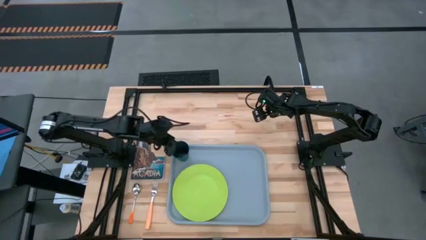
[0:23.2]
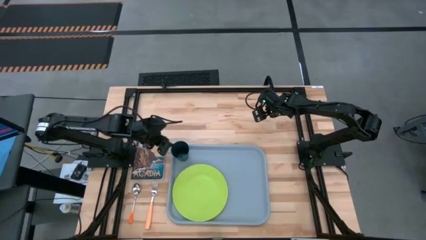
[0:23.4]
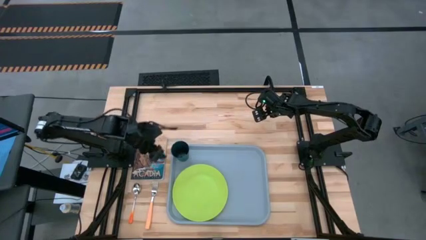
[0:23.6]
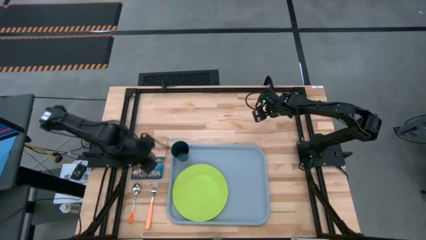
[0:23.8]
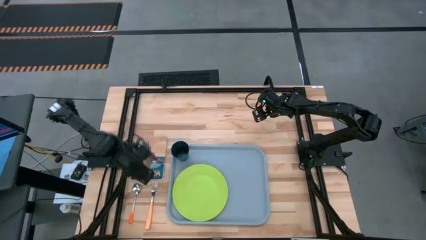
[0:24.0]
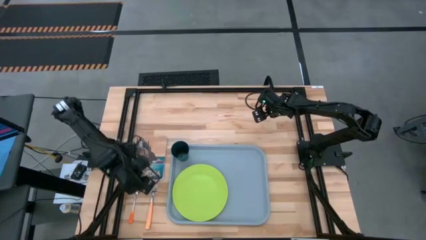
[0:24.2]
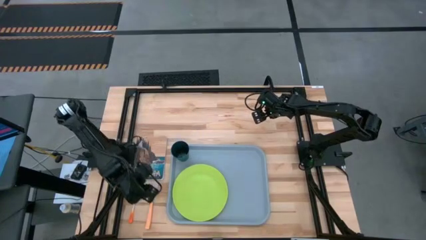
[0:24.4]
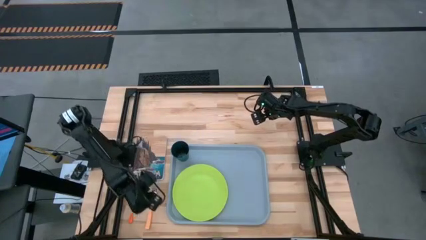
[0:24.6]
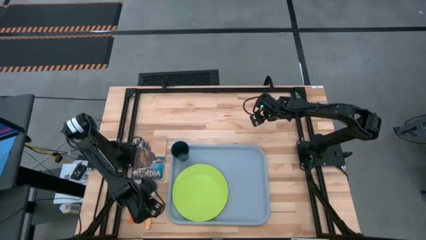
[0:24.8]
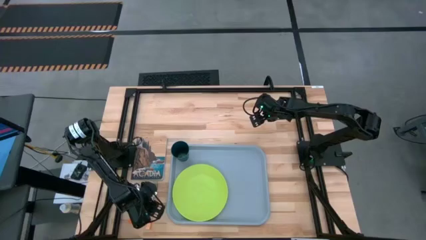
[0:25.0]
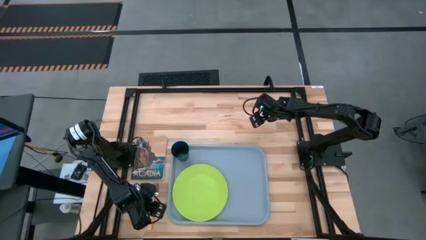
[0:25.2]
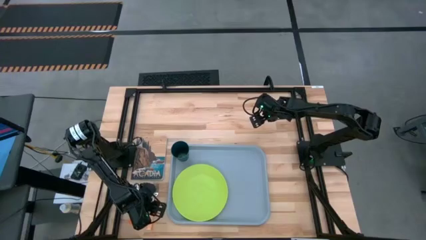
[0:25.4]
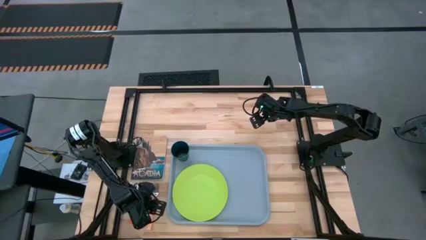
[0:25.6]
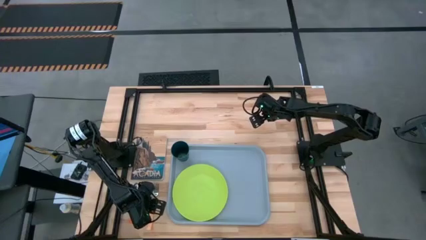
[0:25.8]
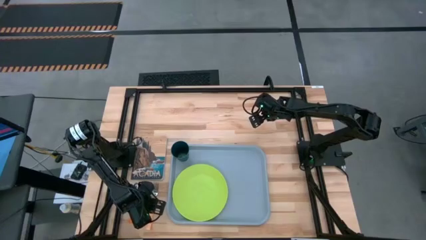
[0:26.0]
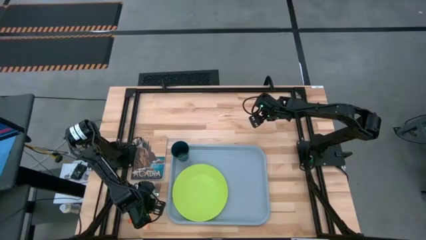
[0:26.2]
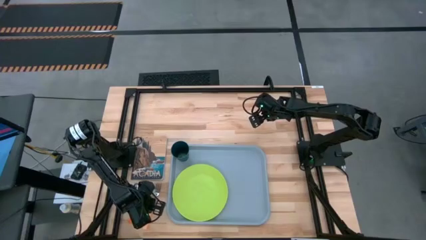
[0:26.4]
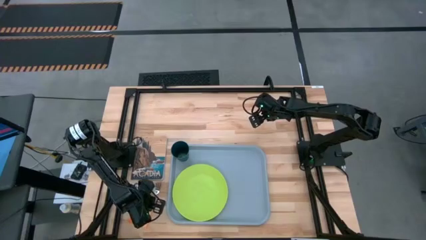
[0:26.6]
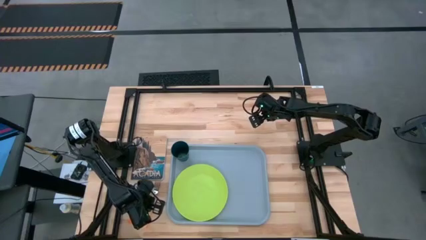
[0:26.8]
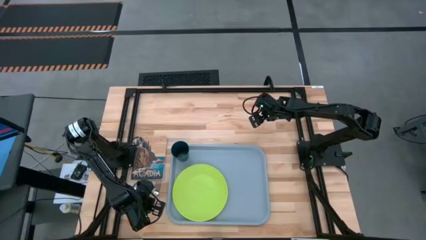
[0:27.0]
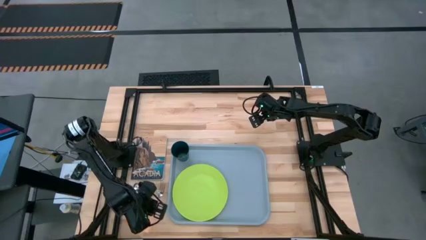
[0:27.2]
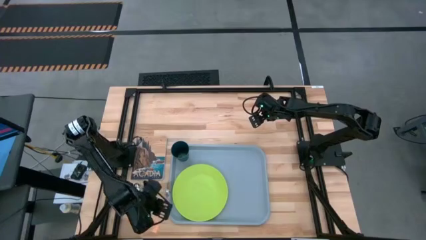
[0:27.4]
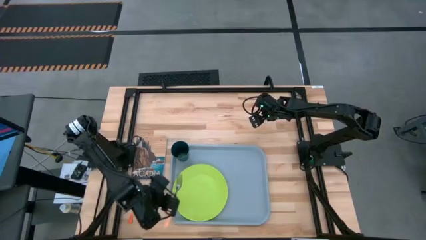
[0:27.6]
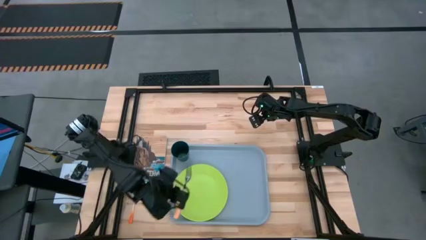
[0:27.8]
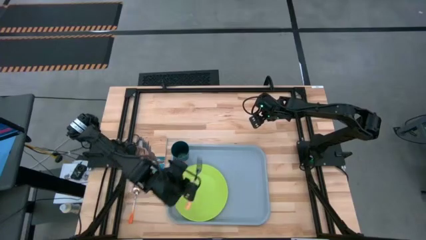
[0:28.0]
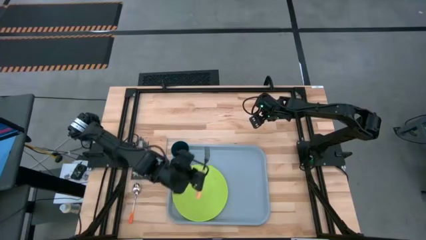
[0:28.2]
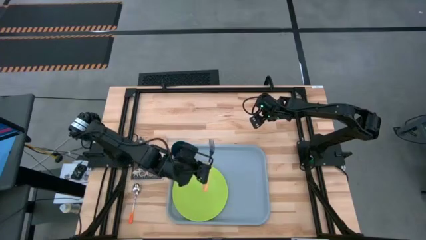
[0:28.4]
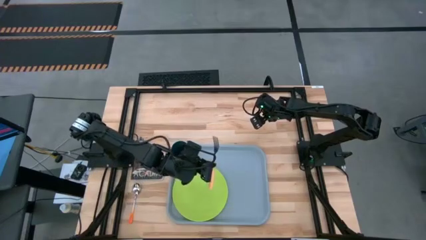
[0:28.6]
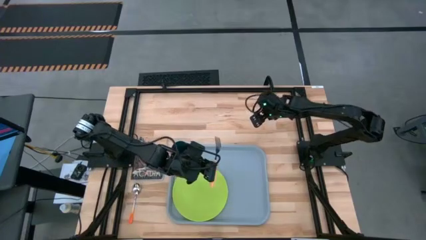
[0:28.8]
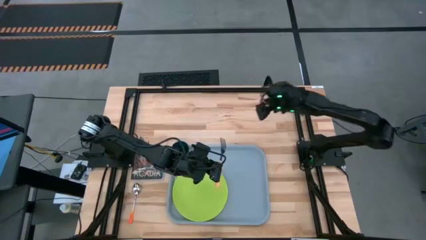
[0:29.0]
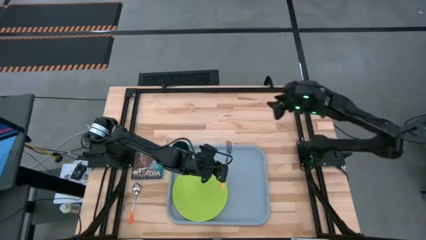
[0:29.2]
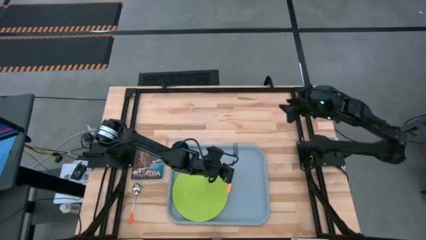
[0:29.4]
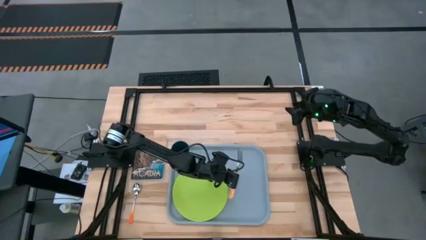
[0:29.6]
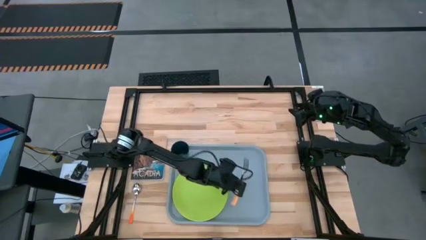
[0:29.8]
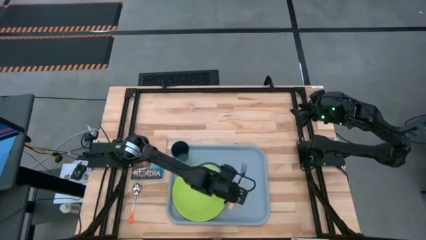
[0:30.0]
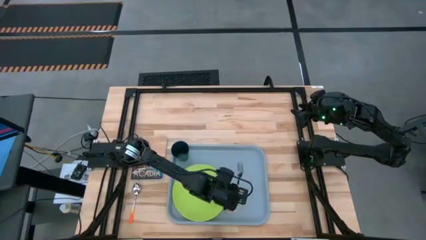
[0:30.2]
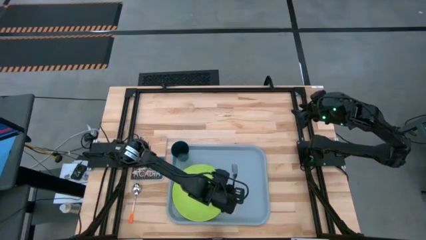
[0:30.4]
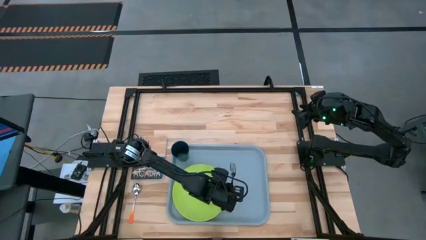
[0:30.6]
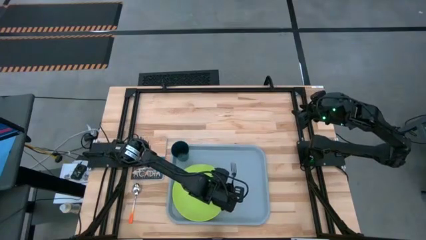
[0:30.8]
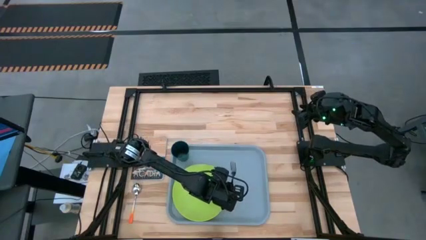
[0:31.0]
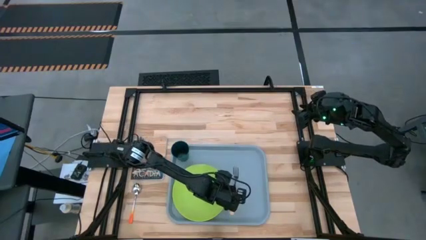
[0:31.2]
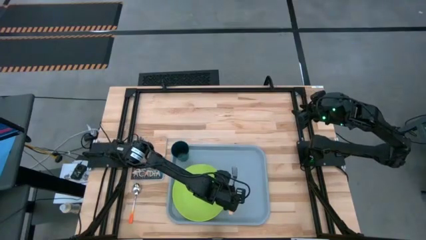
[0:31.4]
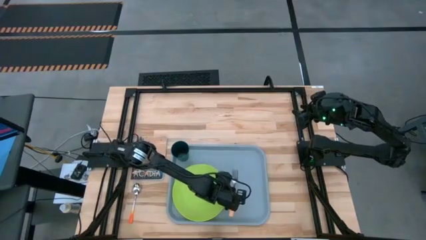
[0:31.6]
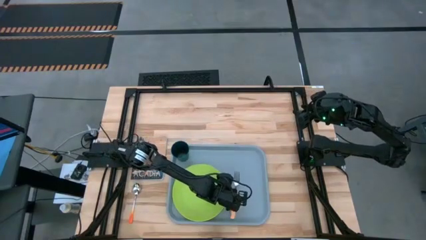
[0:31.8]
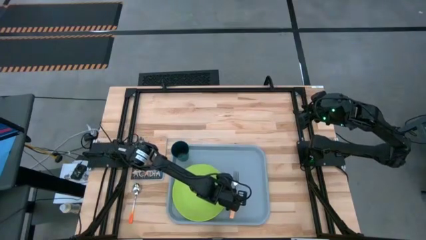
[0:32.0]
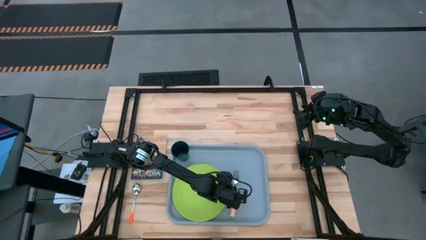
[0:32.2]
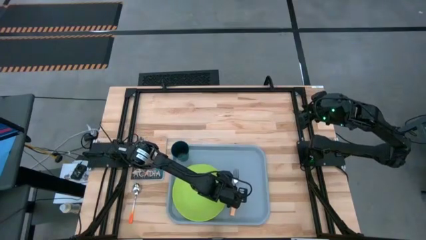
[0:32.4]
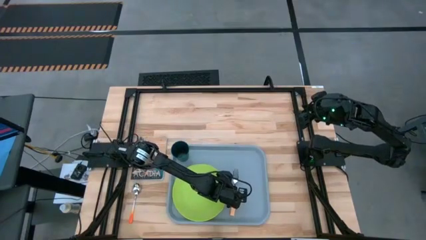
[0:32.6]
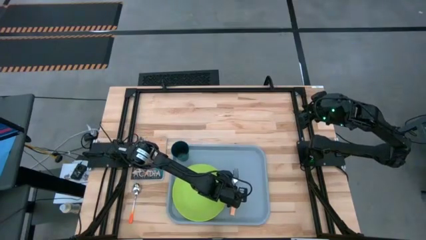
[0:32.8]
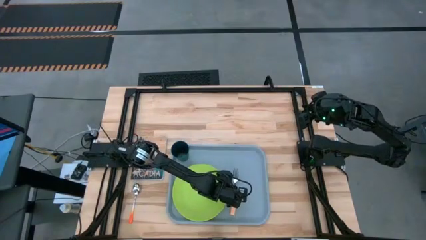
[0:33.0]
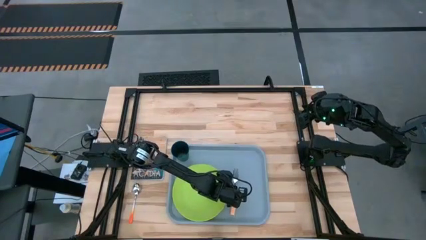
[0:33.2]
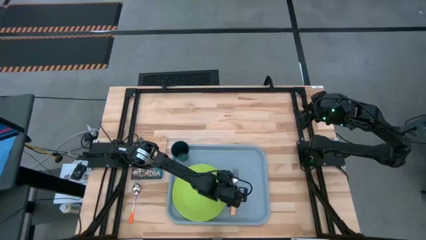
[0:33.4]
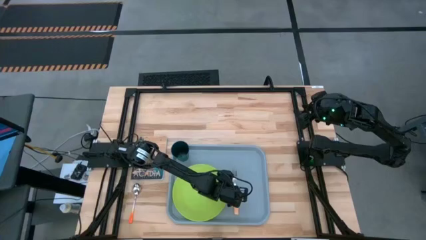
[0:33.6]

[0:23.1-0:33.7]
Task: Pick and place plate/cup/fork/spoon on tray
Put the orange fork on the gray serving tray to the right of the green plate

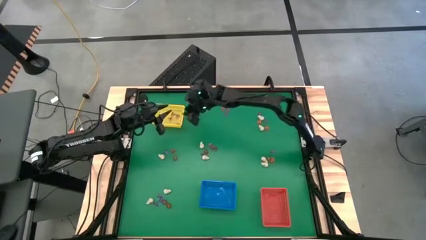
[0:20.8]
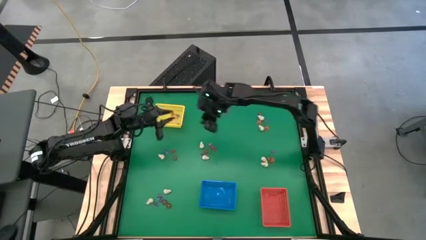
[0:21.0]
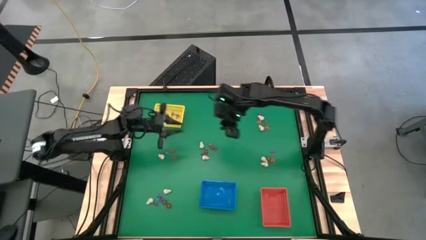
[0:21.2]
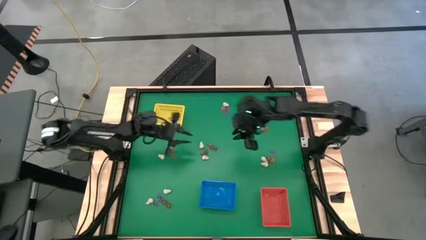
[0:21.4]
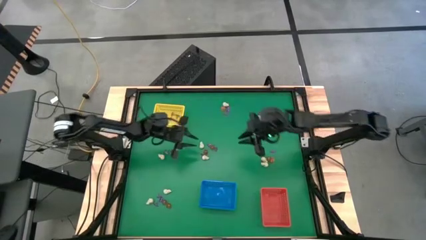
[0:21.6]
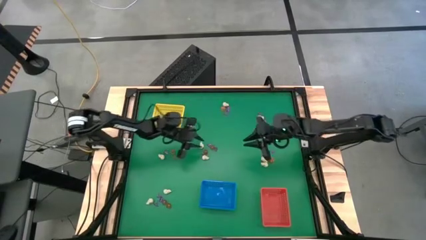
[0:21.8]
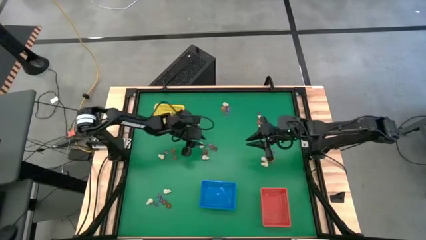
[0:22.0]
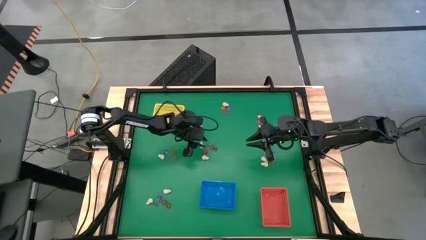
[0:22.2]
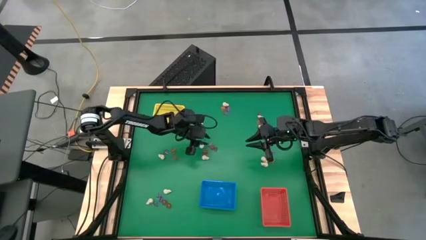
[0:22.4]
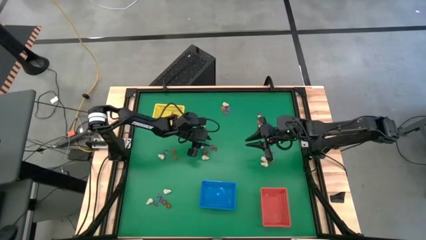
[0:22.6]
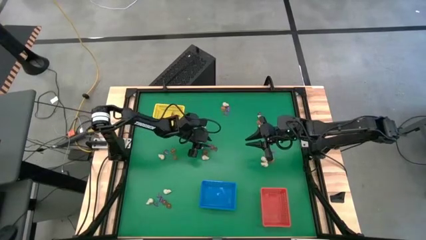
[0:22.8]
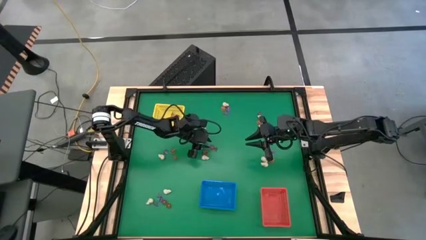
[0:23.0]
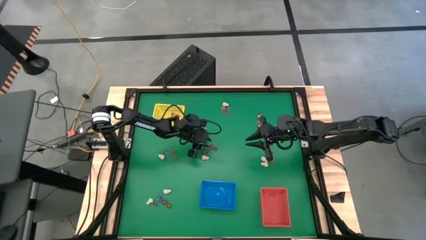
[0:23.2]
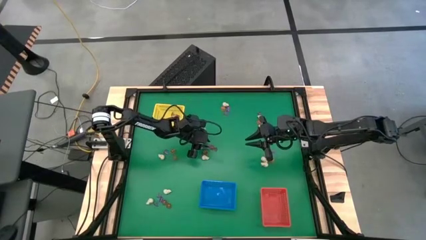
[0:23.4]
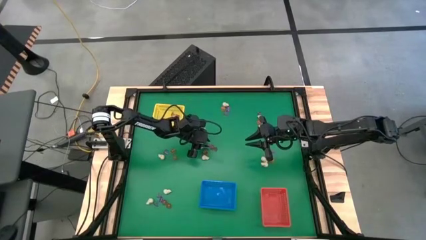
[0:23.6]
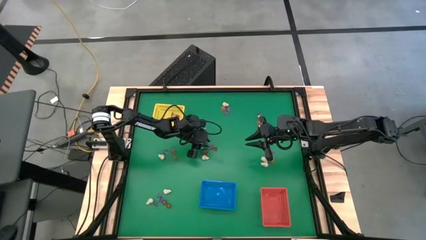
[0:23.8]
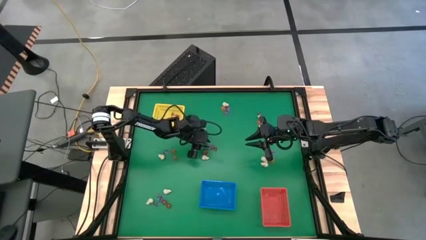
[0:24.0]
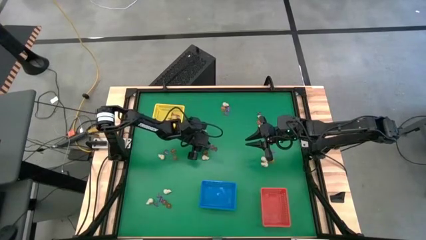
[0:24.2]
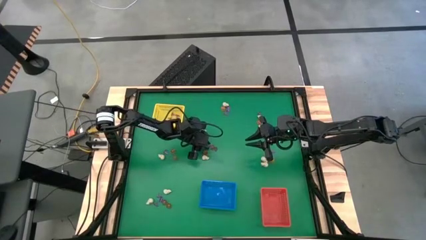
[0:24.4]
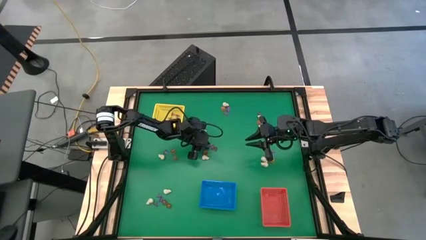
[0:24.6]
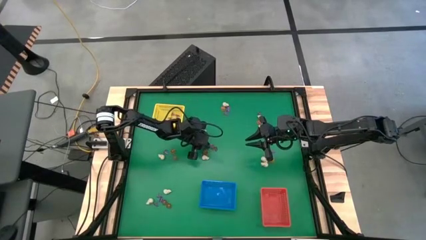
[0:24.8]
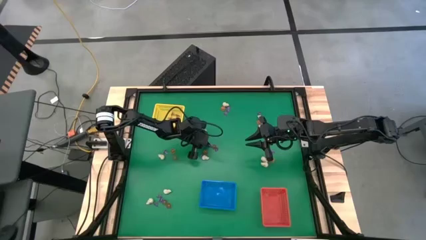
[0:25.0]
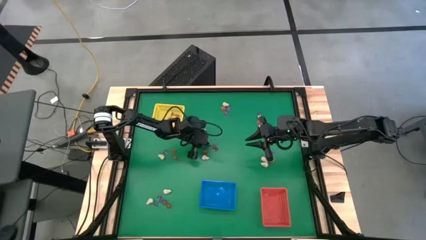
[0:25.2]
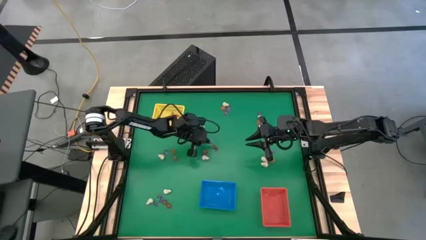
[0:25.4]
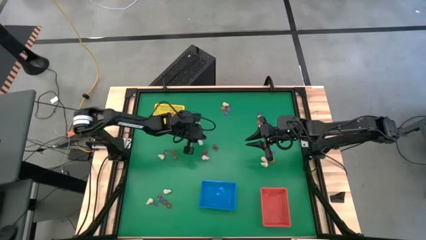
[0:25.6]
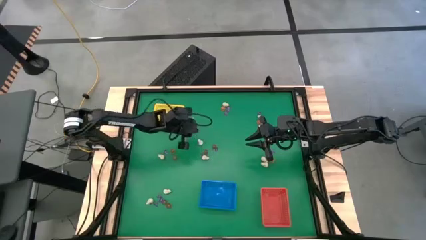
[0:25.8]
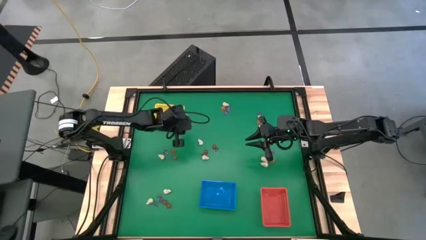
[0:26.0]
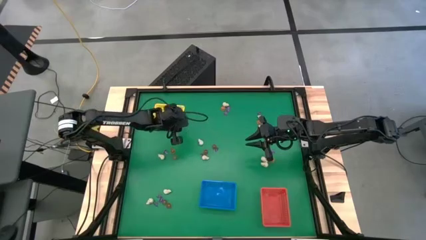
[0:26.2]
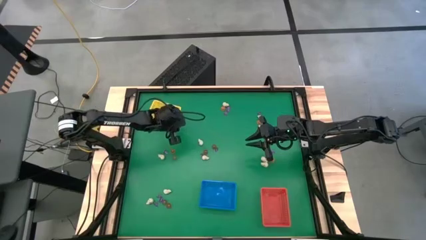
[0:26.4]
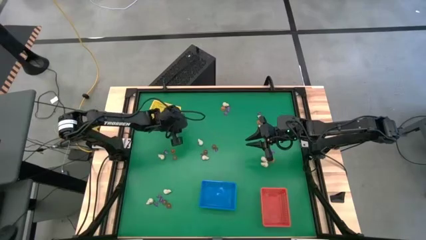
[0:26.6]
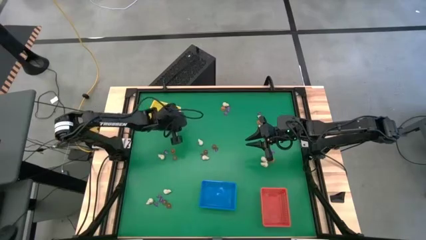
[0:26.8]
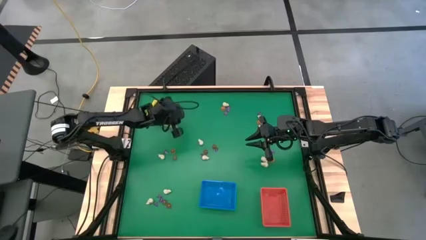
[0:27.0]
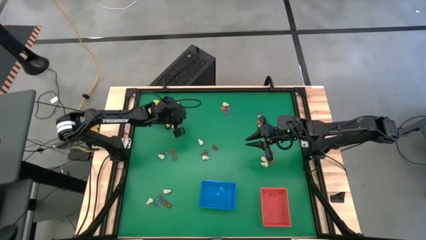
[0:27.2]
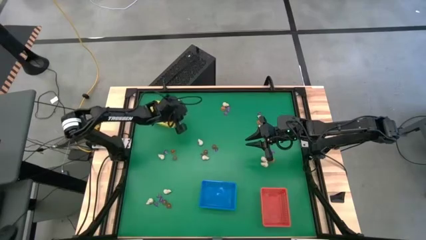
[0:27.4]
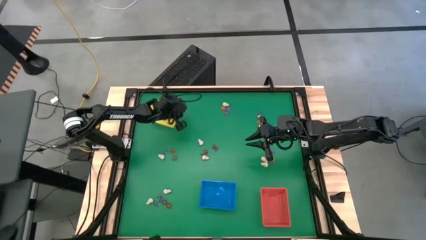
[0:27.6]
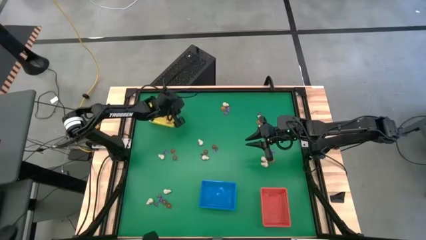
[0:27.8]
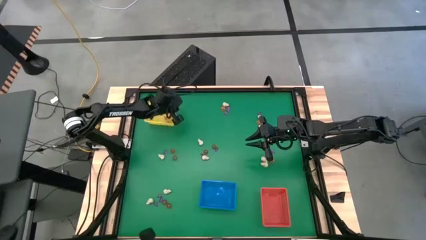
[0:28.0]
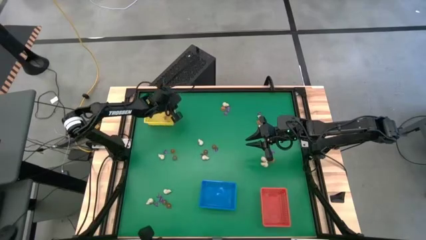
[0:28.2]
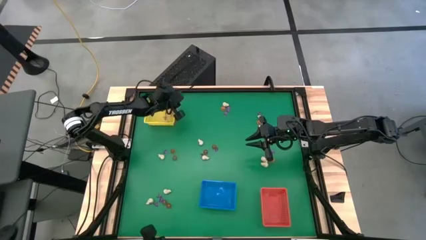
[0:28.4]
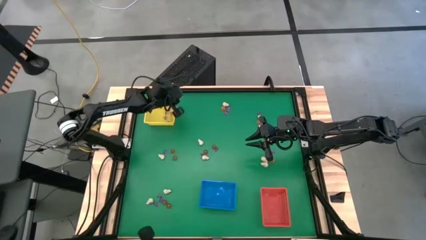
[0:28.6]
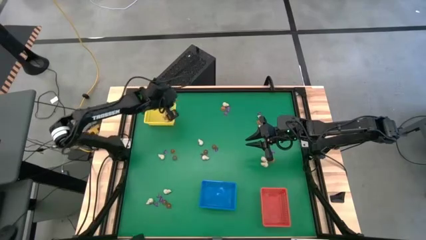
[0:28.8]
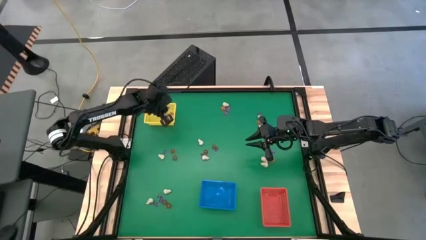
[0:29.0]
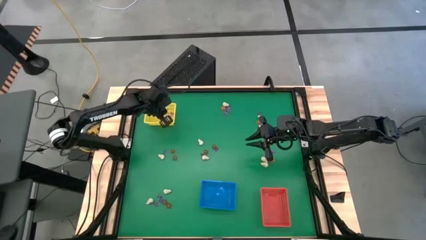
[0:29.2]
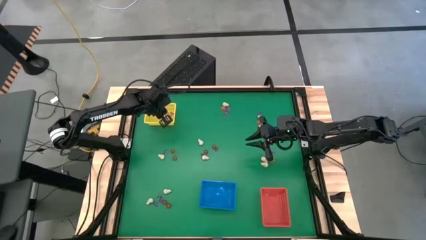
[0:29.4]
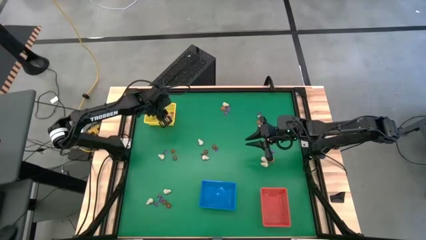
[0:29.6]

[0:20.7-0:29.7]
Task: Sort Halloween decoration
Put the purple witch hat toy into the yellow basket
